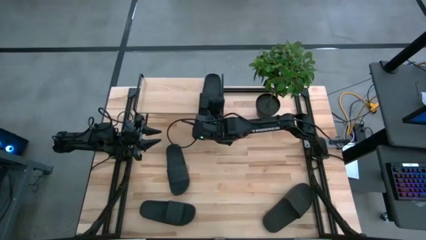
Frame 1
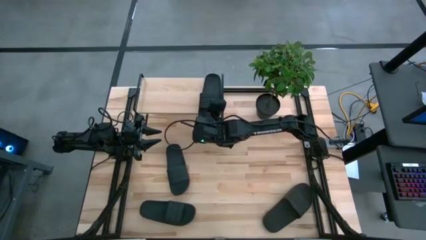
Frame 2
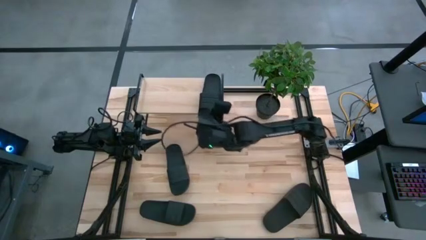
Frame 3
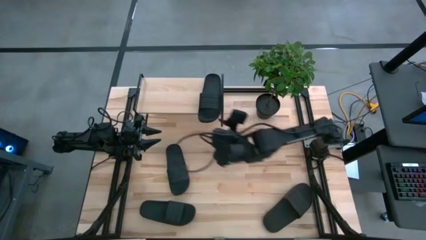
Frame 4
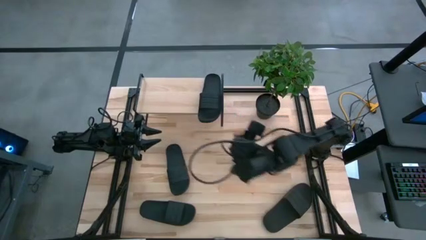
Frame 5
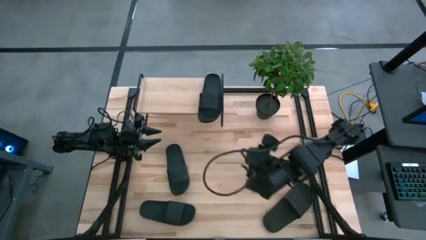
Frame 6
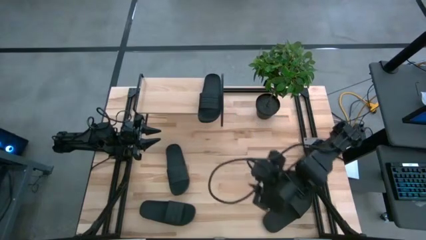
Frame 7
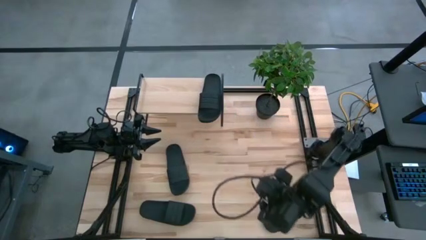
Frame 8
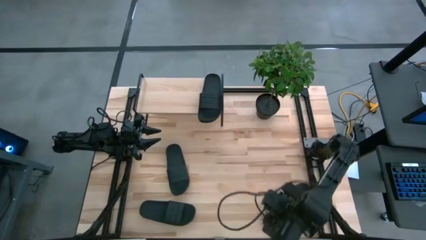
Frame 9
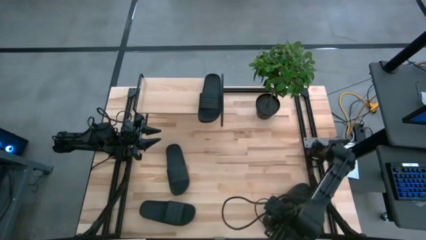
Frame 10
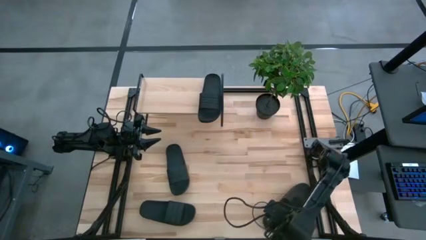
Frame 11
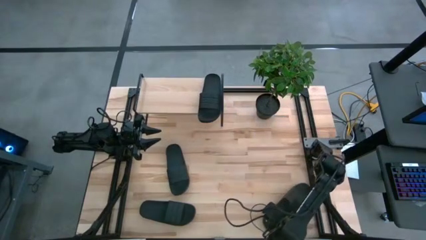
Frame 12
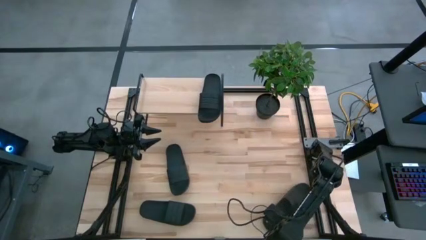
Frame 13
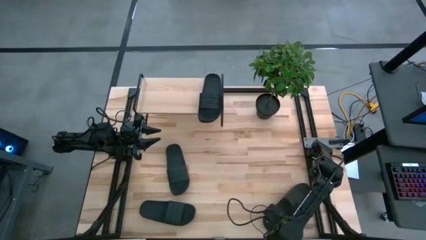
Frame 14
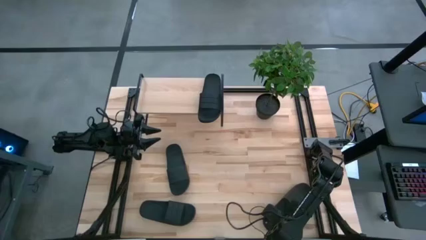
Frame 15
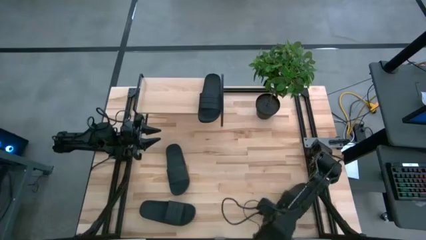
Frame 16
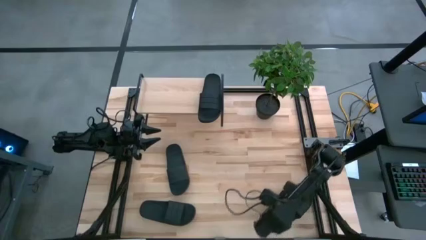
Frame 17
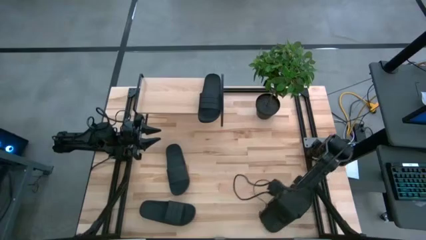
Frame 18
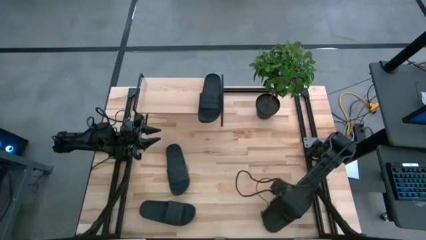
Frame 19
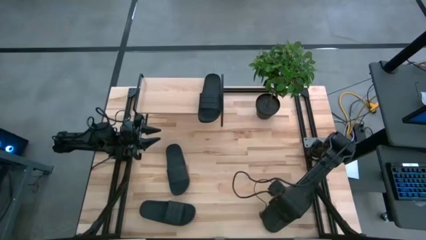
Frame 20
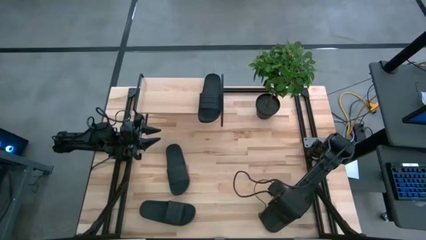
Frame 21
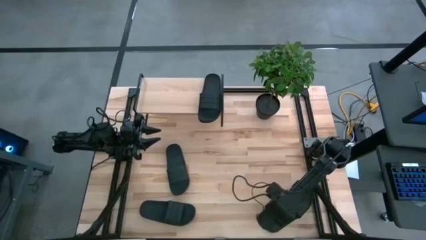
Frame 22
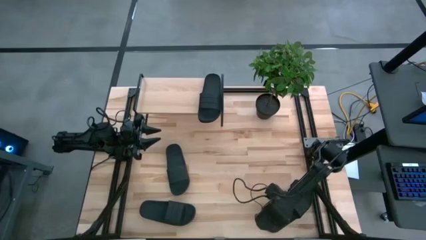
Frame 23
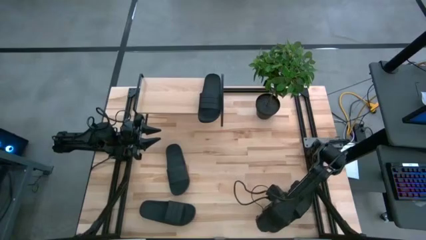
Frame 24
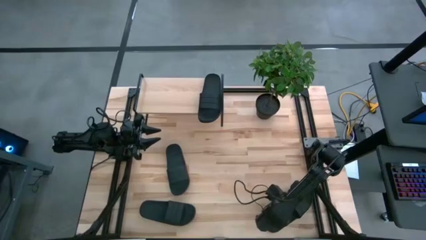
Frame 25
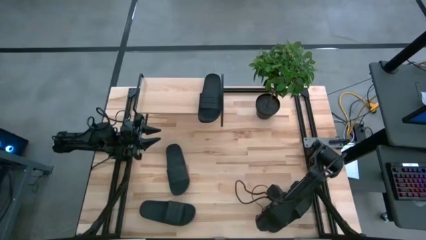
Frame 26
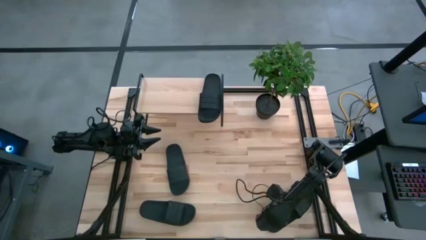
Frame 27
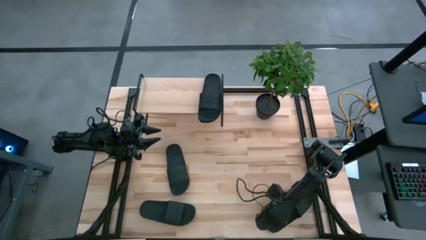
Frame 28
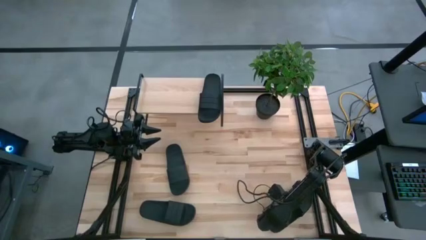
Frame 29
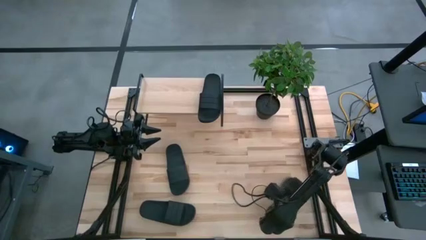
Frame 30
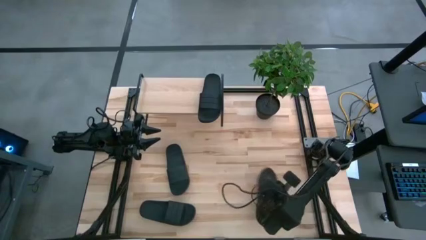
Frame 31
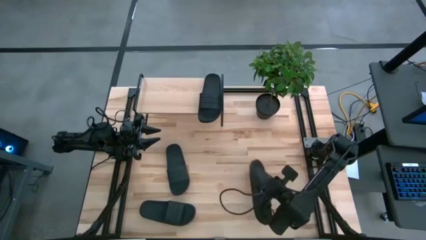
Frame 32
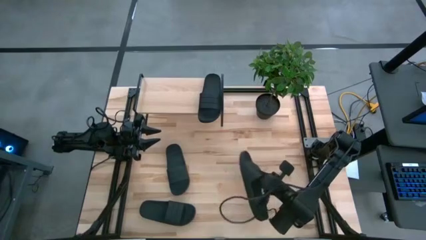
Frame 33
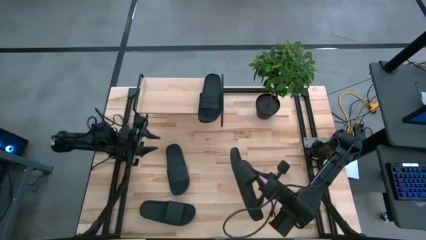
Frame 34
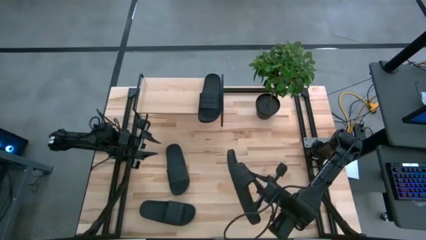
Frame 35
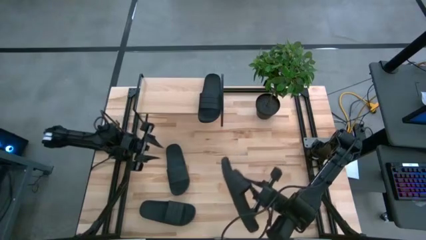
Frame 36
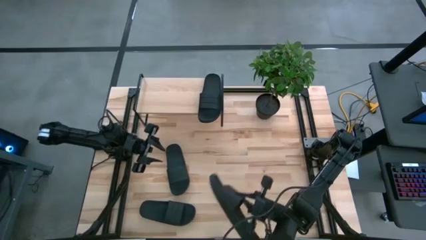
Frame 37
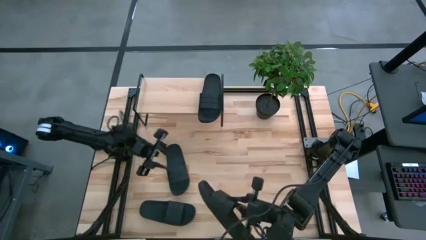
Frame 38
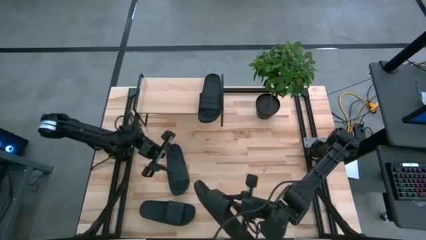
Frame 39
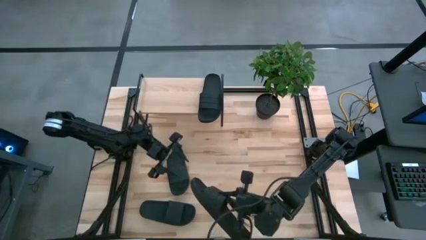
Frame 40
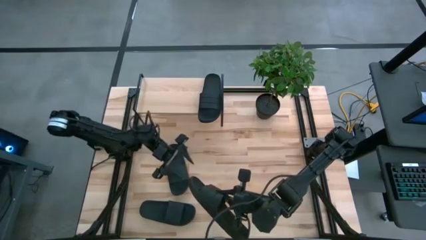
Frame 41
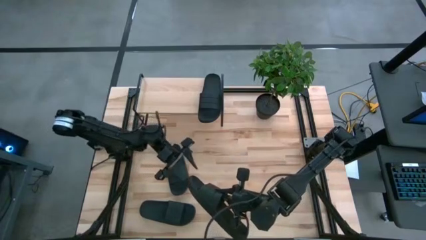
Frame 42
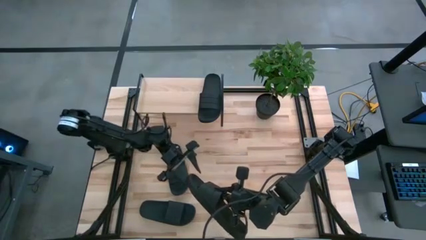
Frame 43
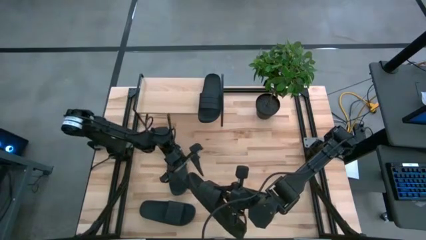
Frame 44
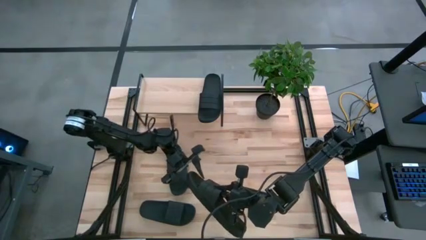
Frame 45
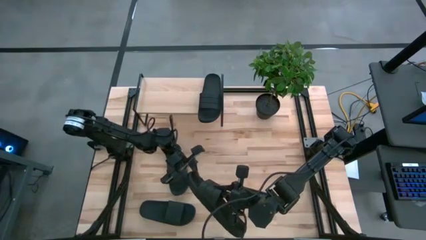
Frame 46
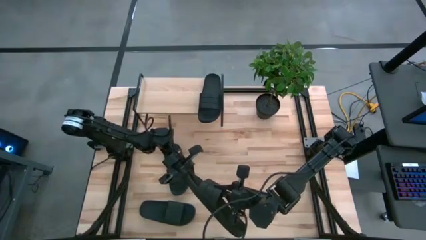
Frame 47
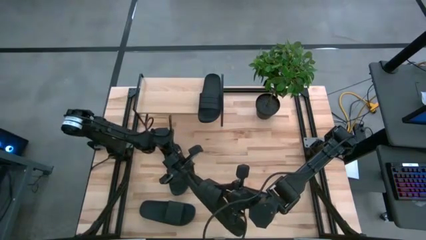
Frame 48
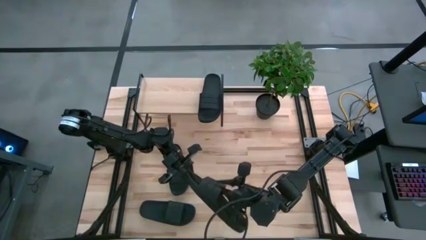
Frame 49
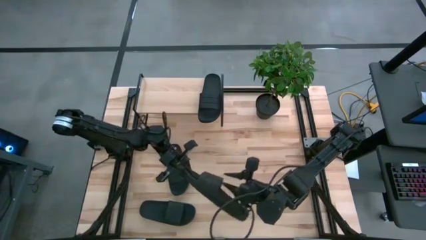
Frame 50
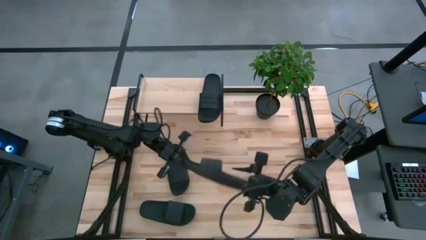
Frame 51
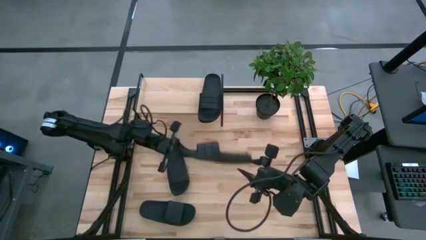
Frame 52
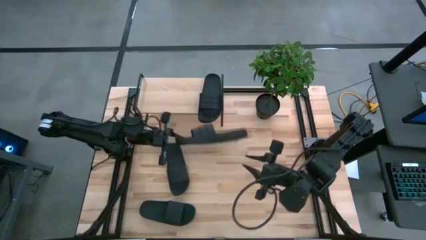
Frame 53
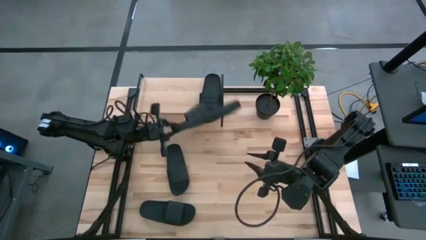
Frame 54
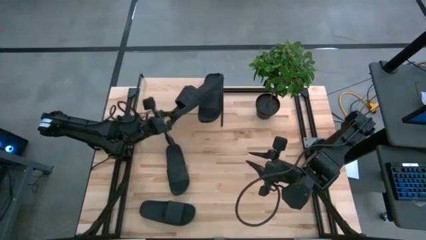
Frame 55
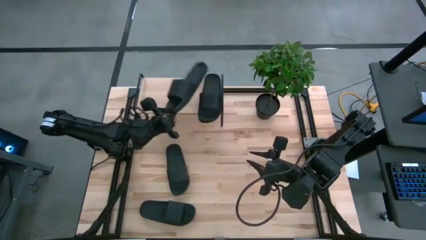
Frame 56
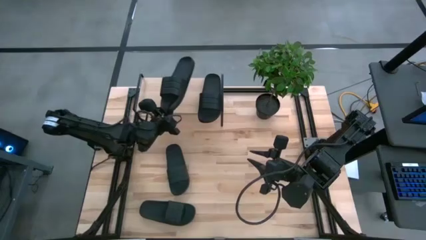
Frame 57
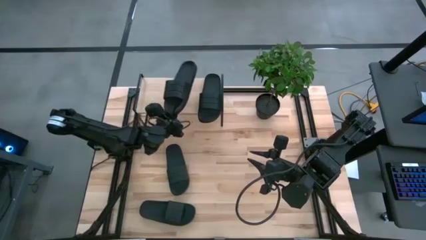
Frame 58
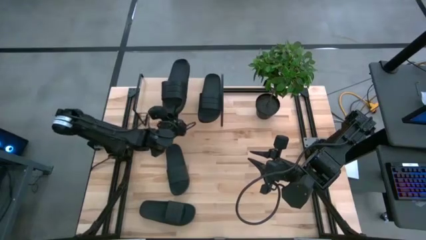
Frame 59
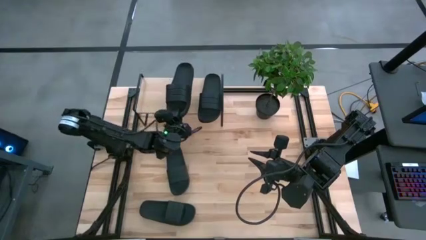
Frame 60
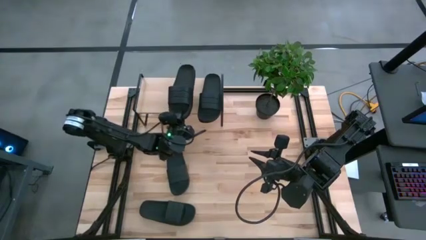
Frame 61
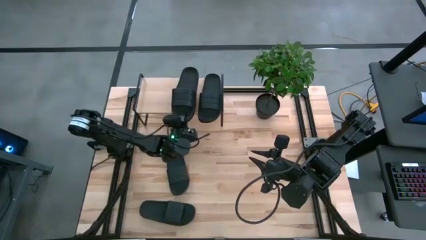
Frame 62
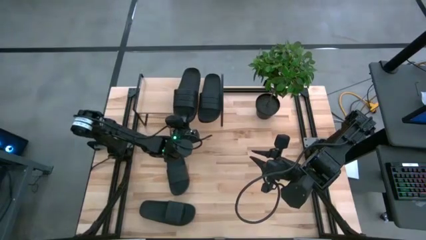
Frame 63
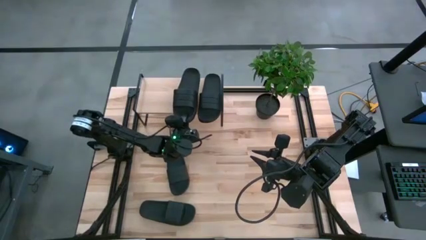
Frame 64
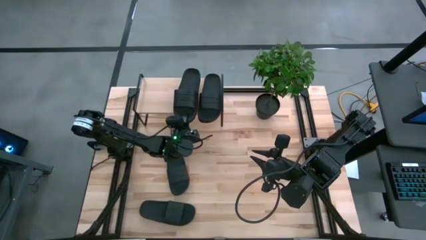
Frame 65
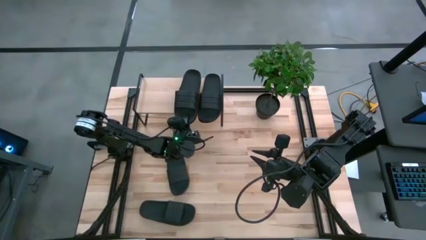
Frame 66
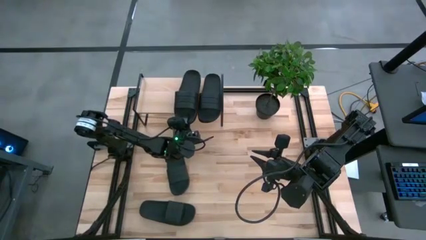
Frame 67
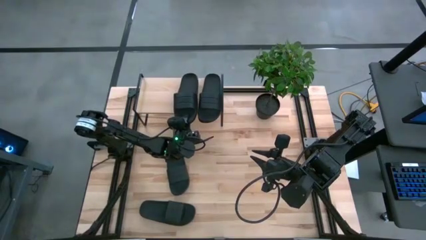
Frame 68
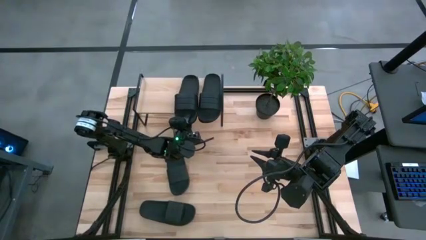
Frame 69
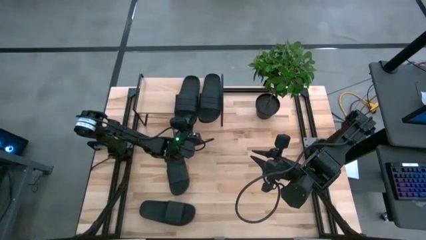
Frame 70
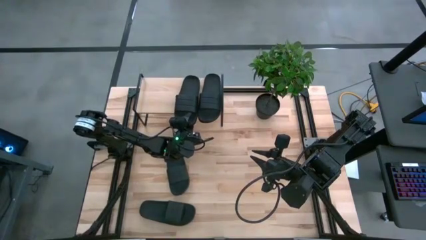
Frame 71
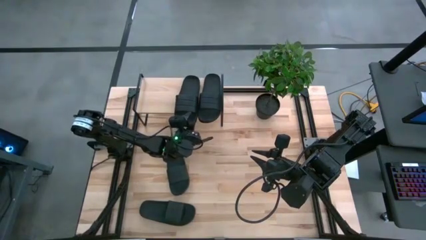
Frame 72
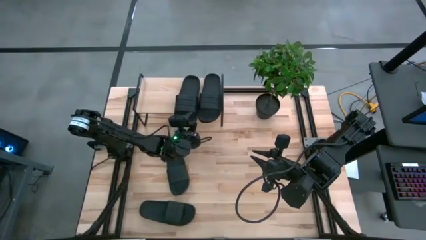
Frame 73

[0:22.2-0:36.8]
Task: Pick and place slides into the shelf
Put the bottom right black slipper on the shelf
